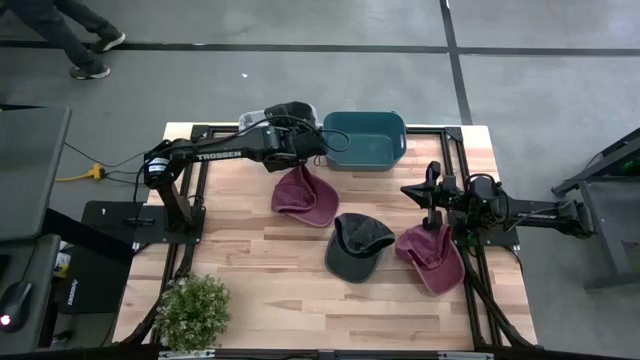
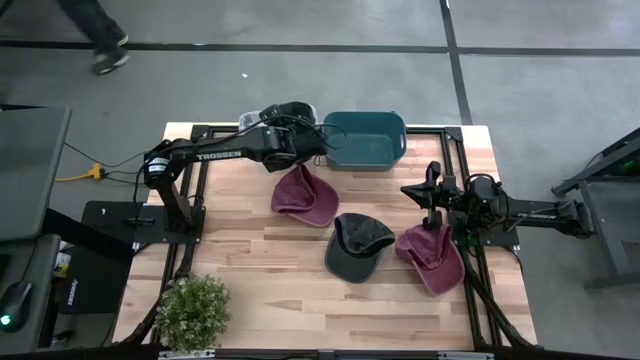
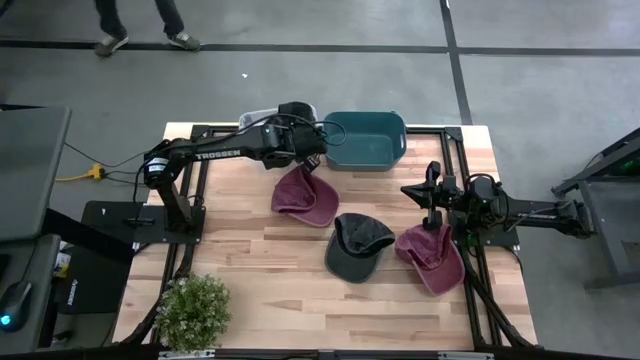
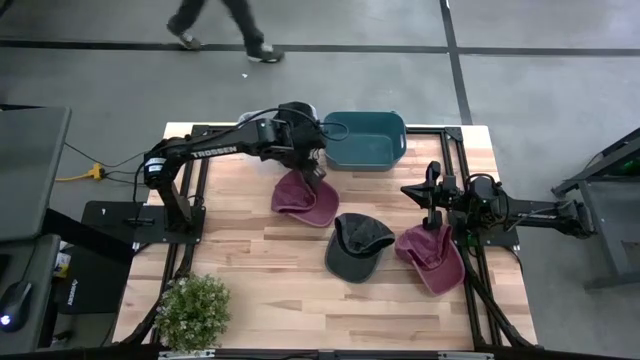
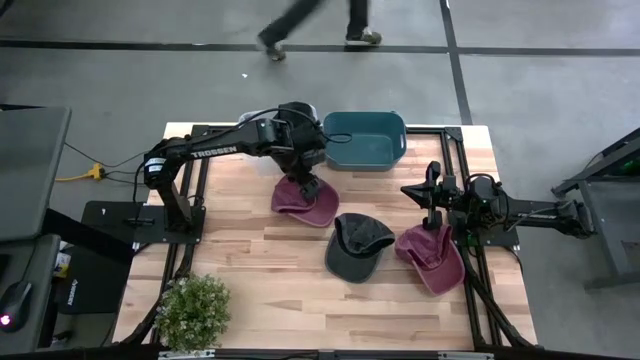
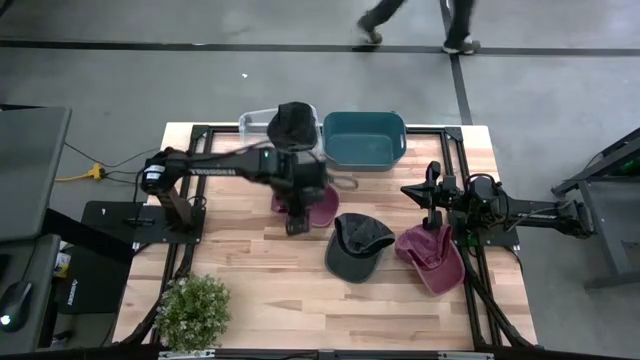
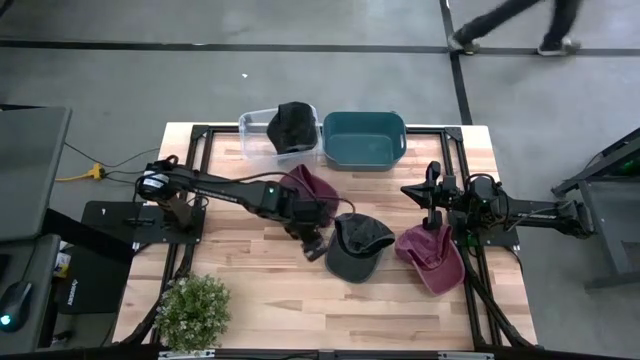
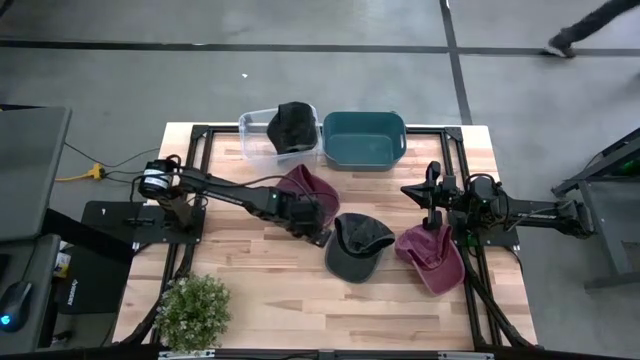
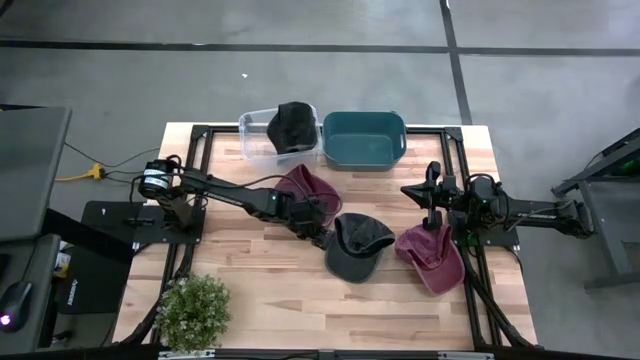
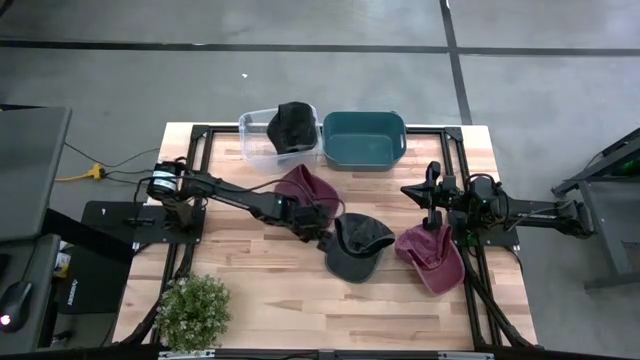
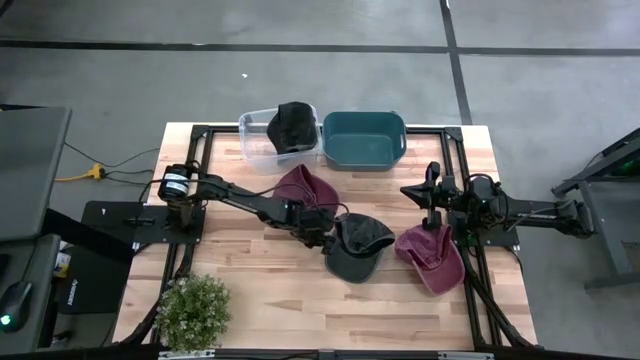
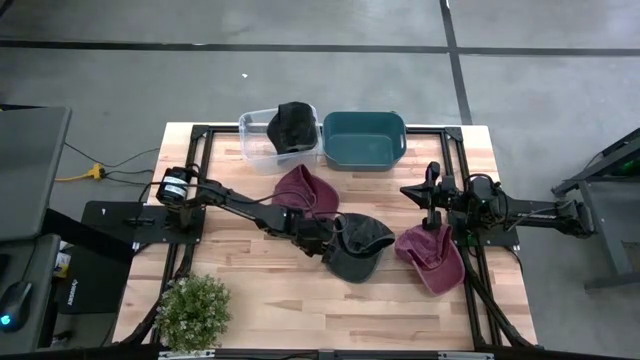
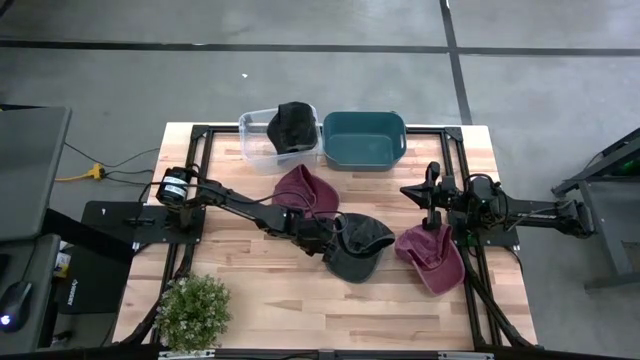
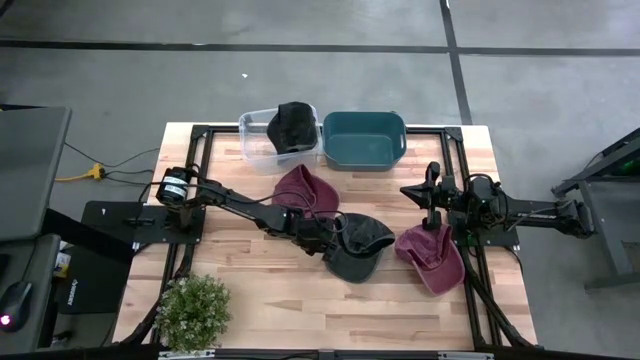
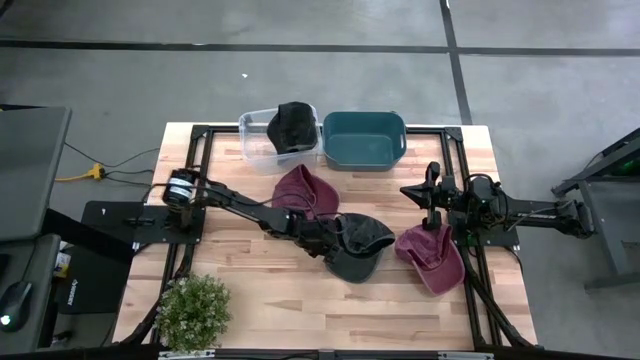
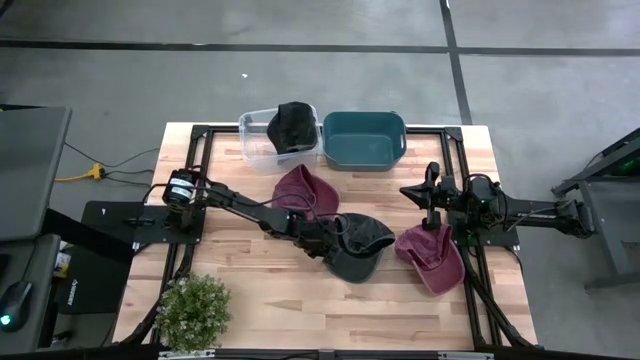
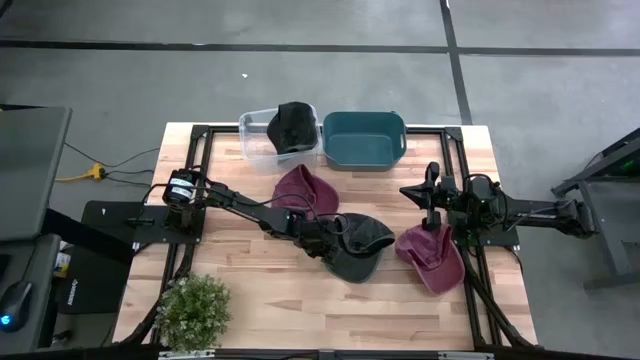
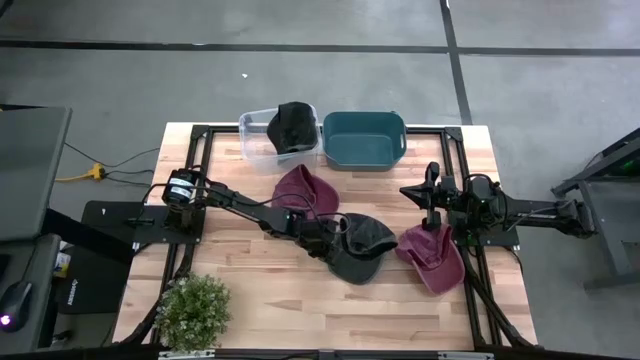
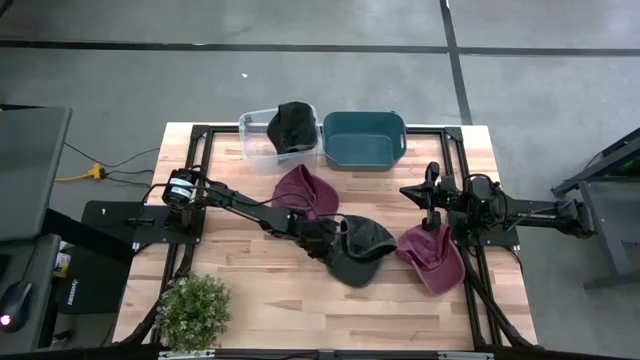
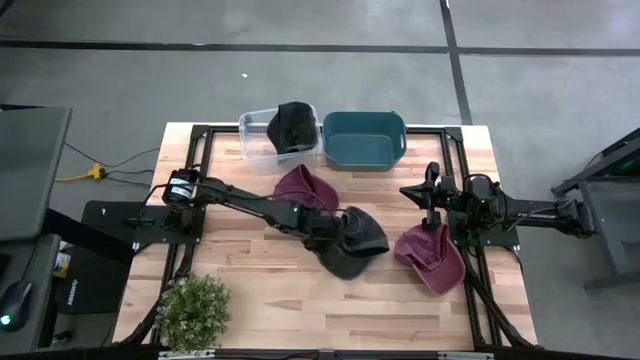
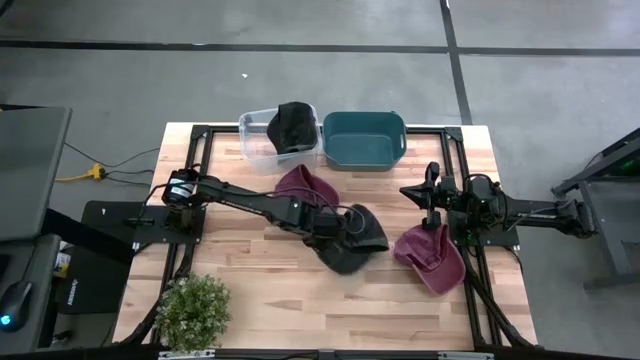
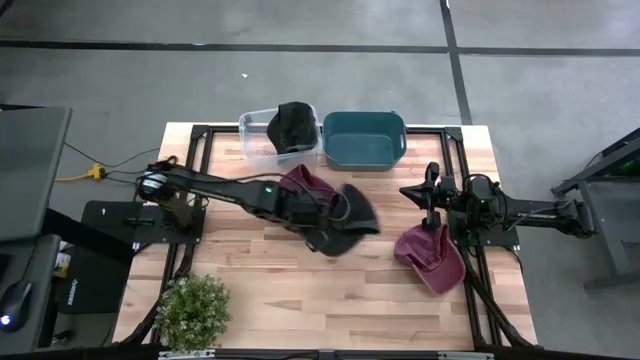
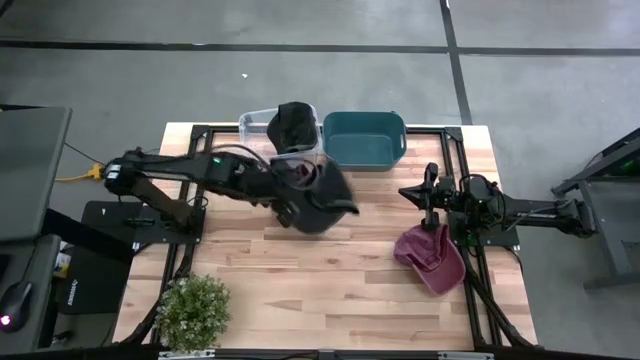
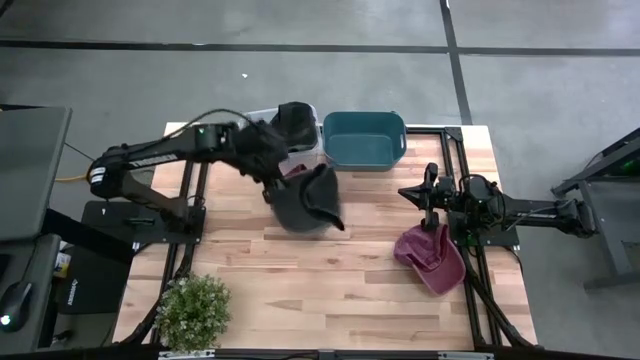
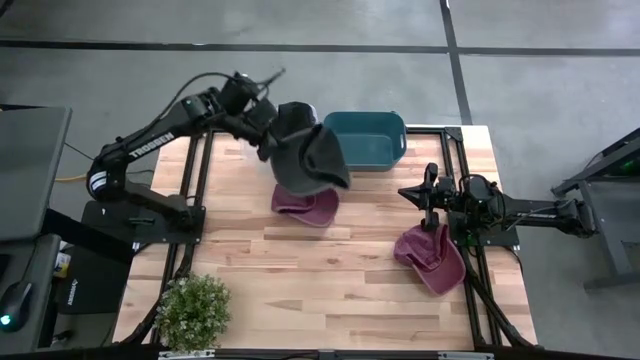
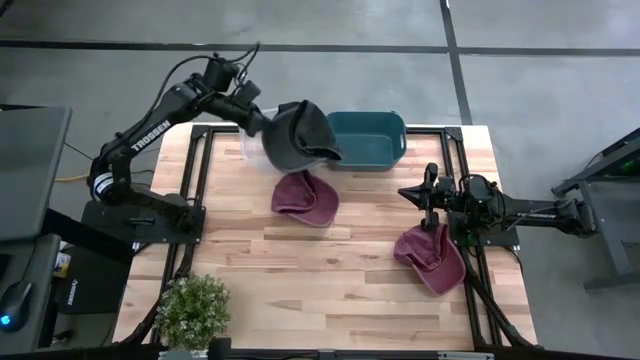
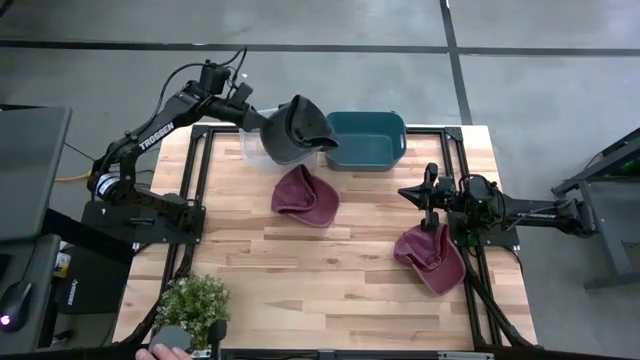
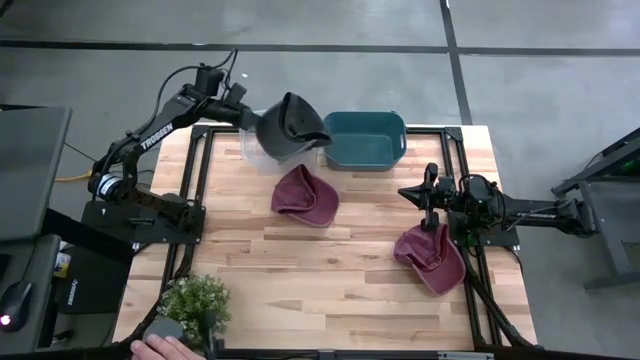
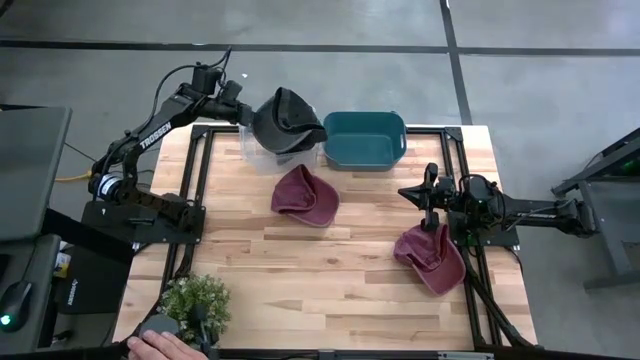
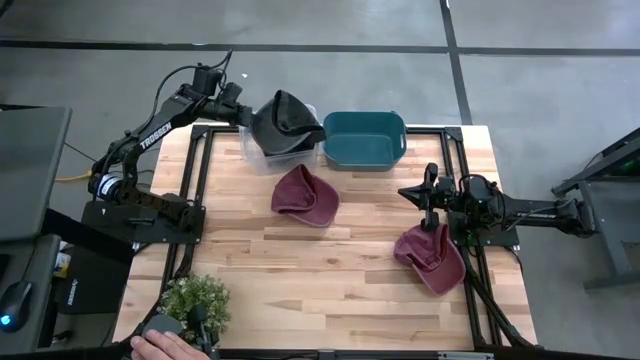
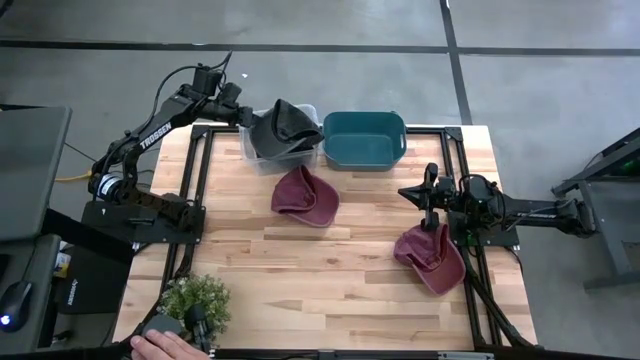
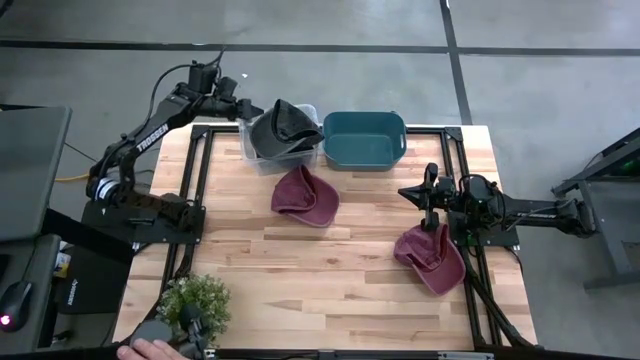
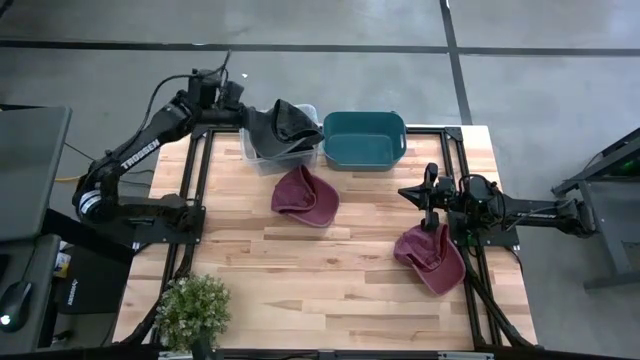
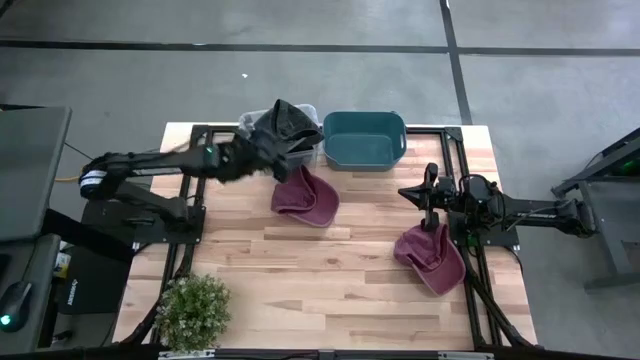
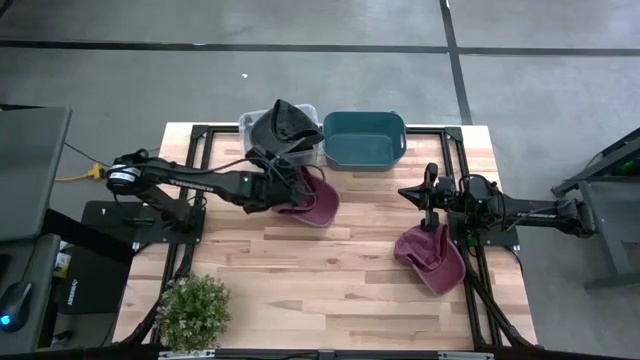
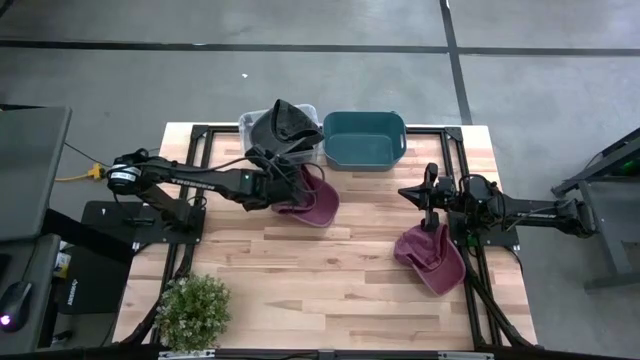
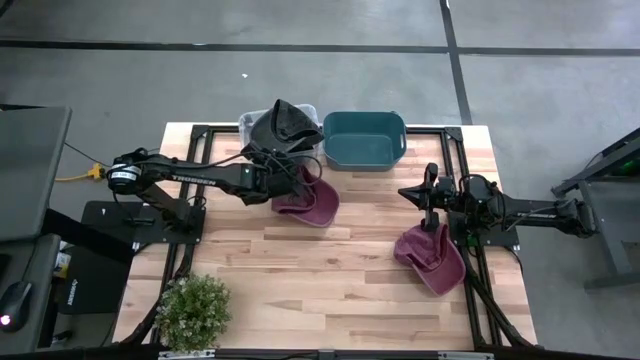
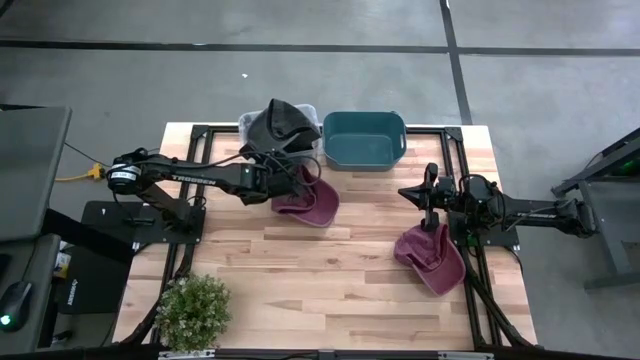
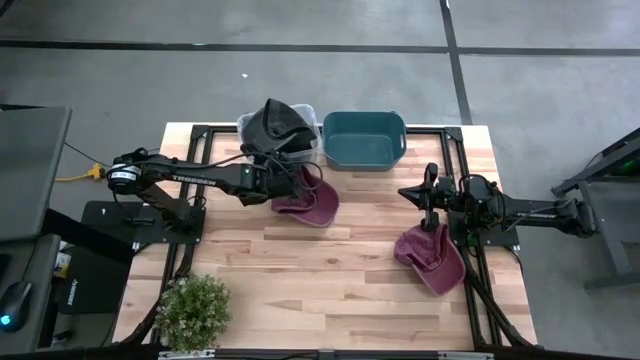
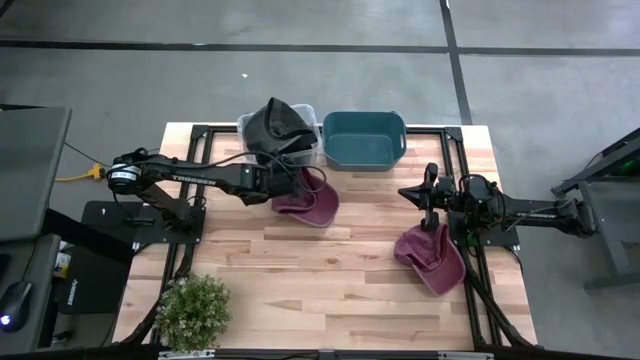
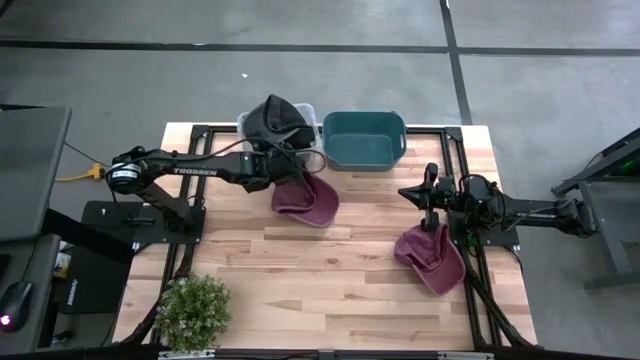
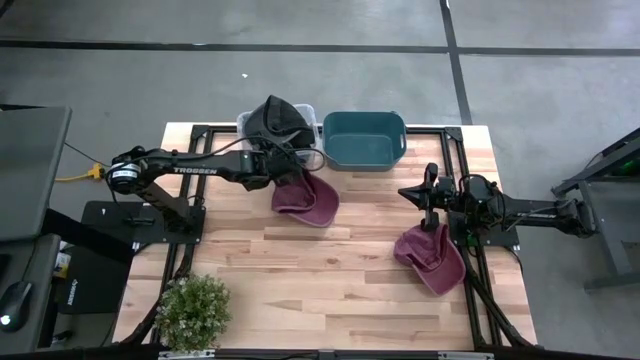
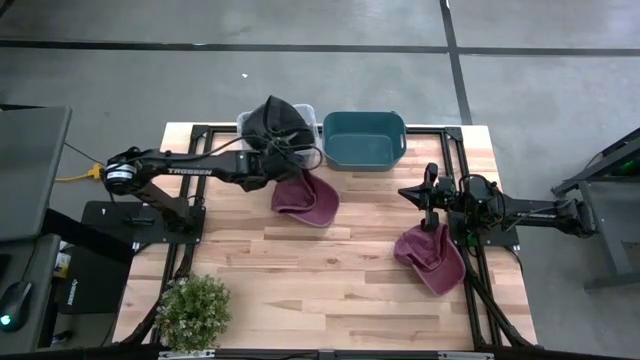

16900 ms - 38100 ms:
Task: Pick & Place hat
Put the black cap into the transparent bin
